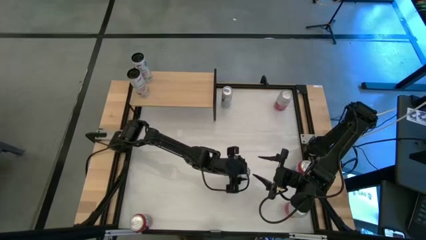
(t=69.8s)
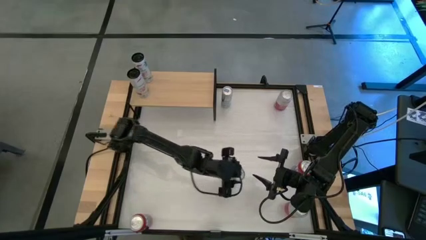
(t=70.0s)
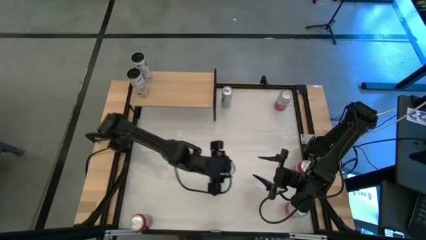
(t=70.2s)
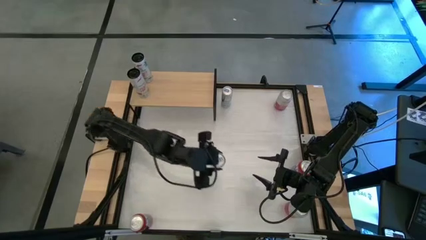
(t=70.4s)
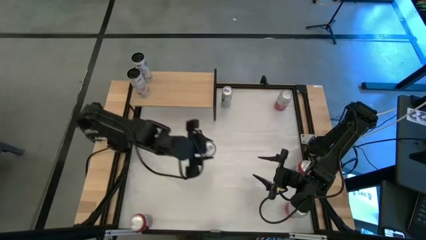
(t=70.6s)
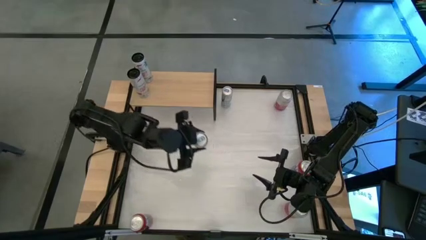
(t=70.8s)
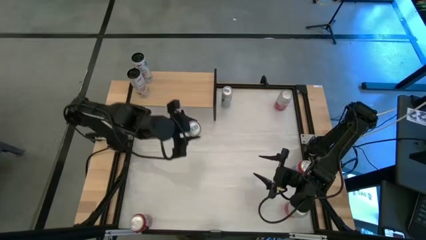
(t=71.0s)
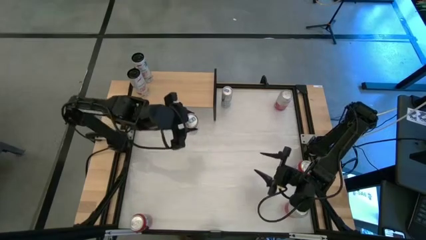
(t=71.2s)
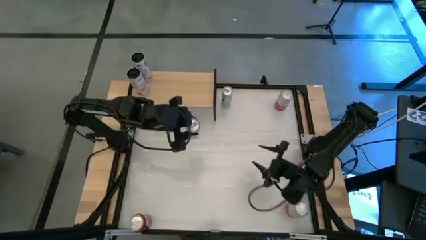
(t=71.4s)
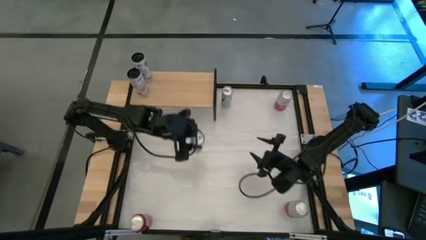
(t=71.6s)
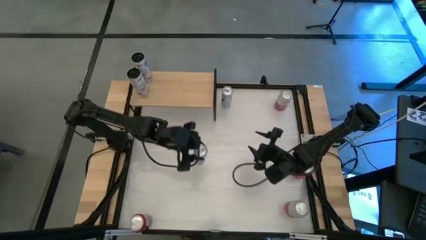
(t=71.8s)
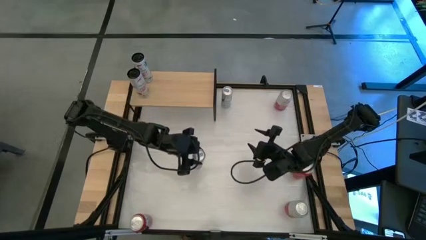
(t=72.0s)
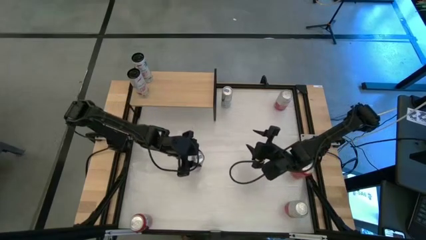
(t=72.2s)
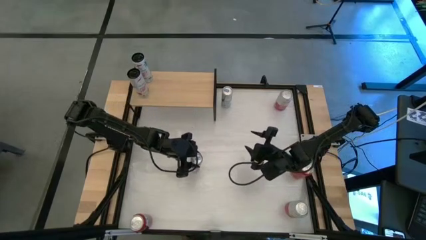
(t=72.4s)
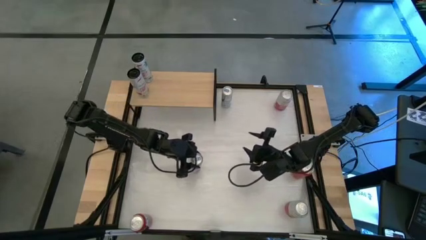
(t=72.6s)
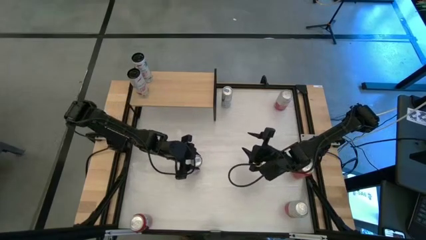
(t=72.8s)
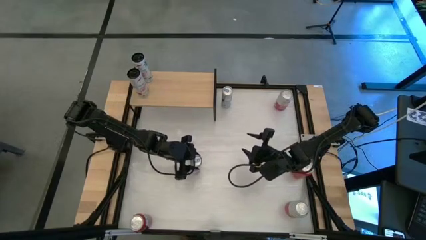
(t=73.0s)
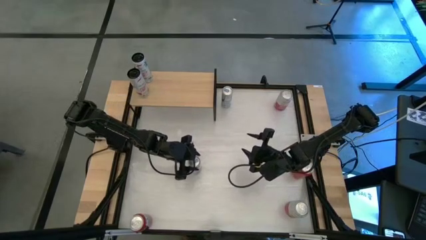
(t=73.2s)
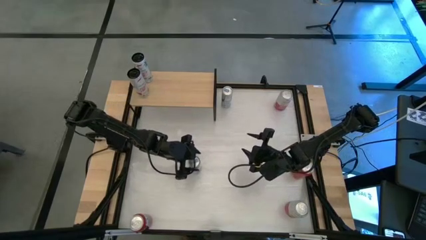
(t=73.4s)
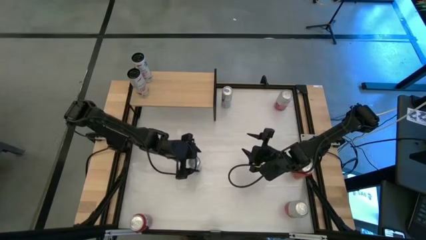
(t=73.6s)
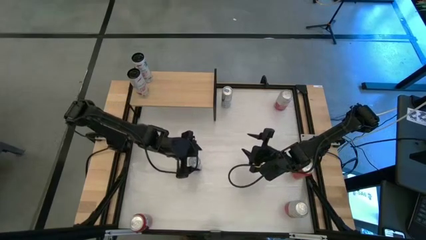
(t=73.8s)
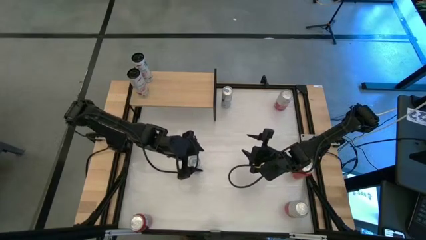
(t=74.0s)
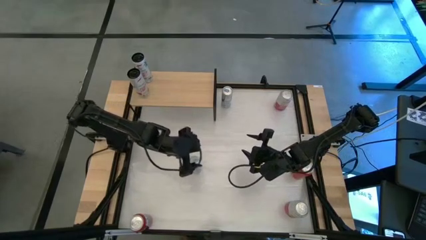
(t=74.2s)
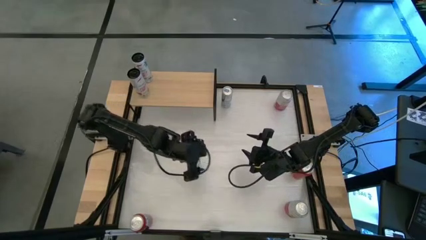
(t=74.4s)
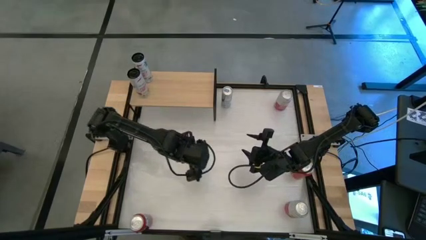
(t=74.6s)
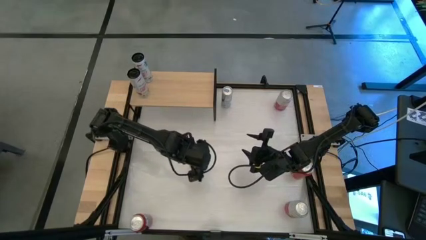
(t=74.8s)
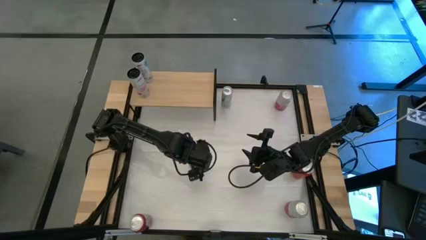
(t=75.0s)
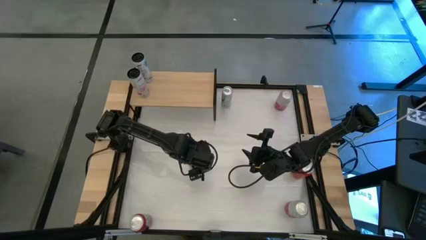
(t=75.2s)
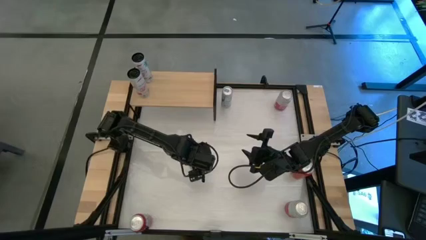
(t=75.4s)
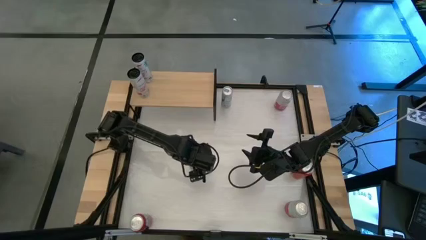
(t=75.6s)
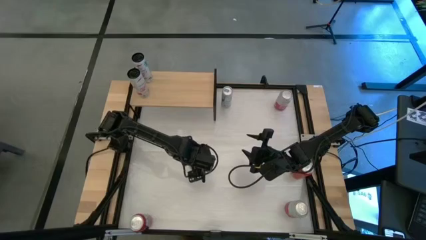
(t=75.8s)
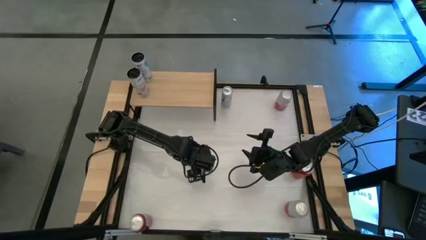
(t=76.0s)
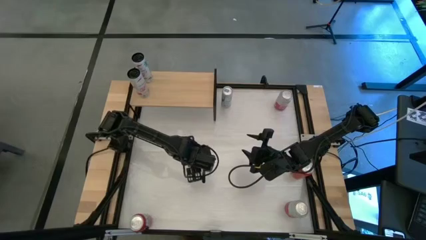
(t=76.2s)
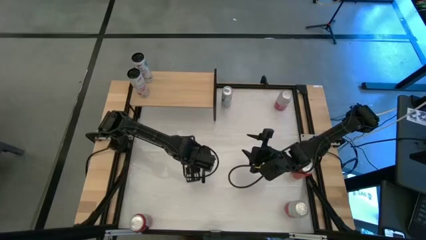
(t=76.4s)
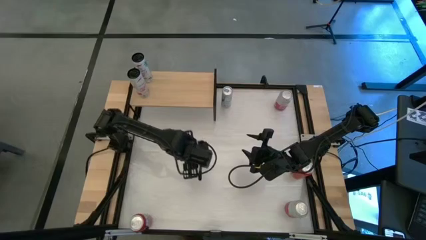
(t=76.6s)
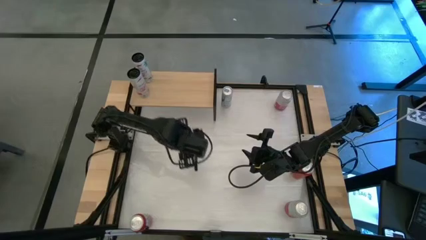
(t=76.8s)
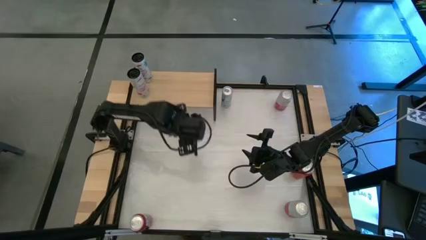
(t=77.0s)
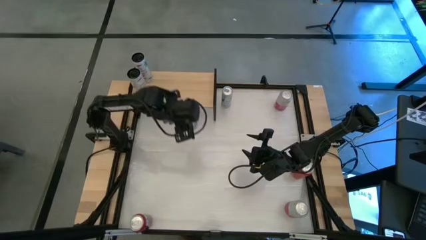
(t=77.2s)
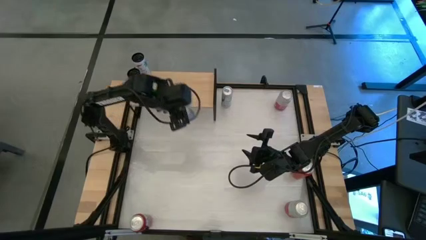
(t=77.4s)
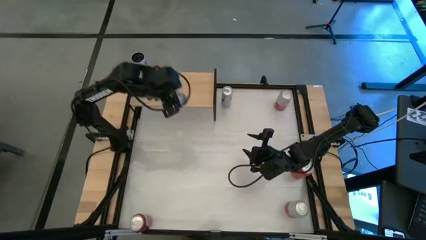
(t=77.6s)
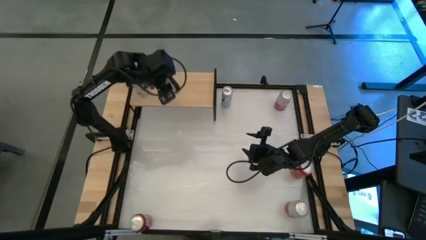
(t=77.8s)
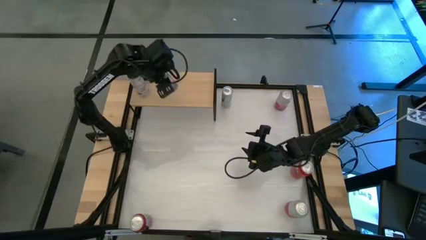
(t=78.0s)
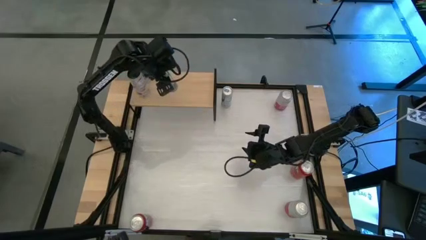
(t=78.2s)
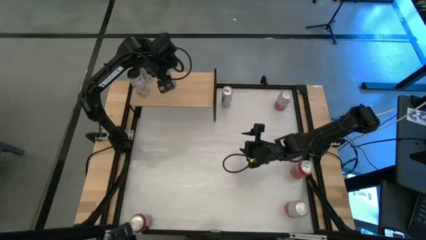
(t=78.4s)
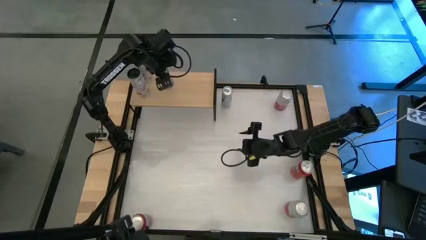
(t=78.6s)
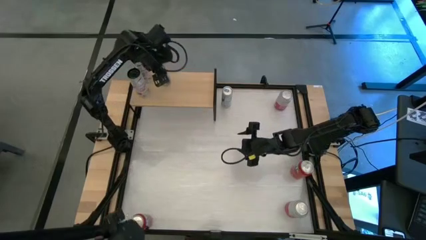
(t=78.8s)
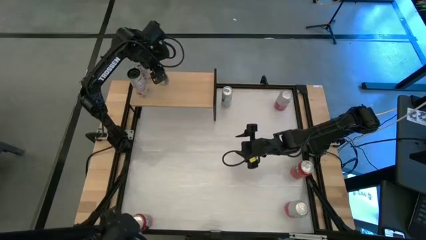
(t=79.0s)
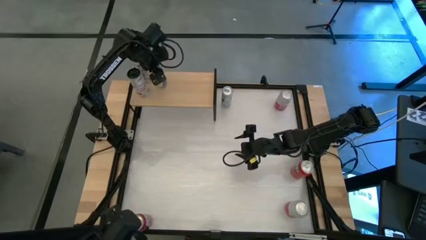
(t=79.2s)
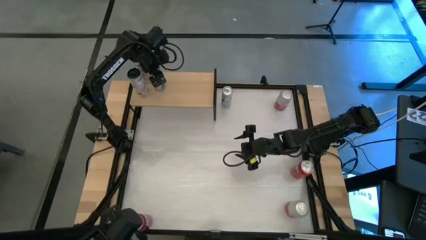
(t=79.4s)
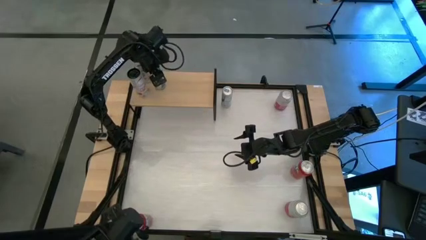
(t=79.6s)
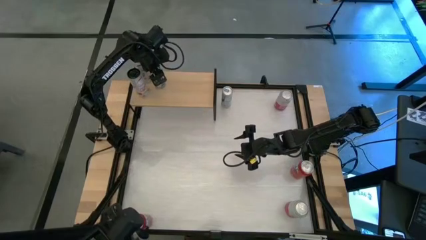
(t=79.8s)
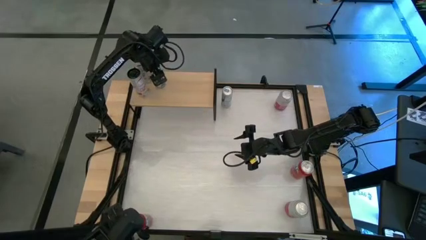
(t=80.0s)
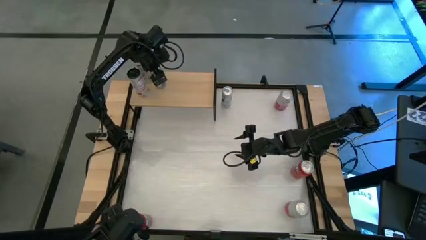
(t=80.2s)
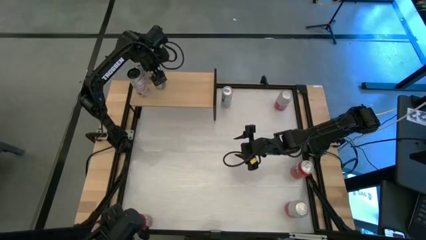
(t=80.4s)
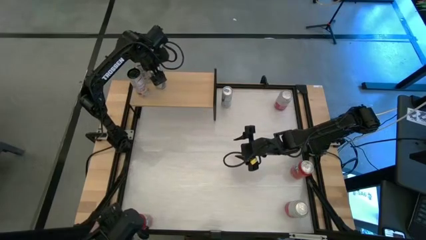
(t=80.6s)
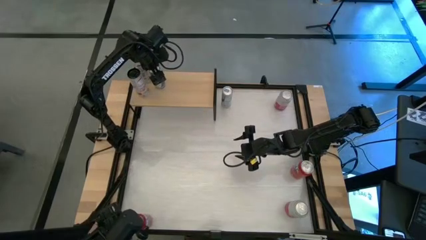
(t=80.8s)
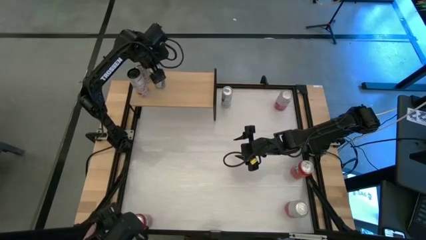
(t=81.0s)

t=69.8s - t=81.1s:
Task: Place canned beverage on shelf
Put the bottom blue soda can on the shelf

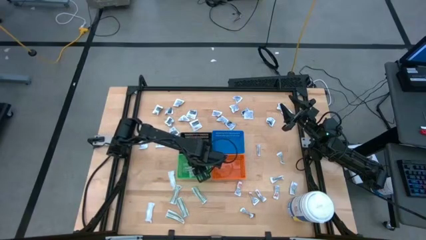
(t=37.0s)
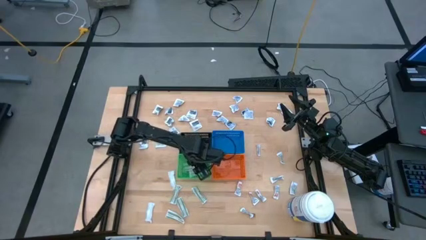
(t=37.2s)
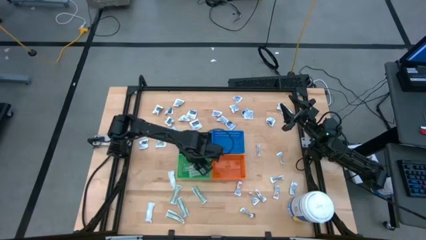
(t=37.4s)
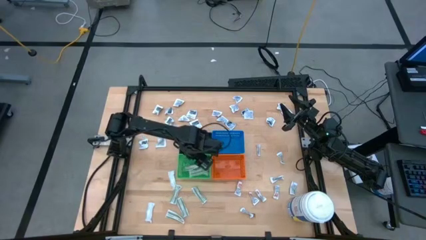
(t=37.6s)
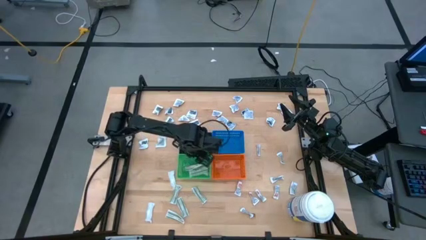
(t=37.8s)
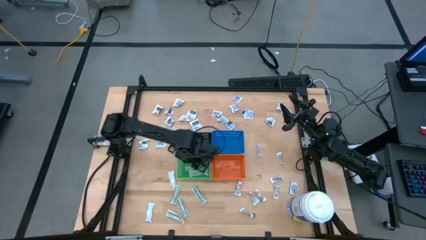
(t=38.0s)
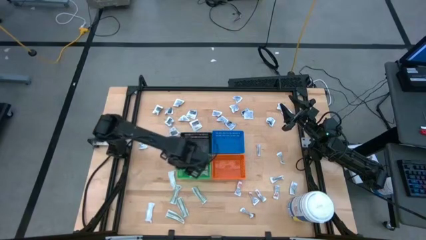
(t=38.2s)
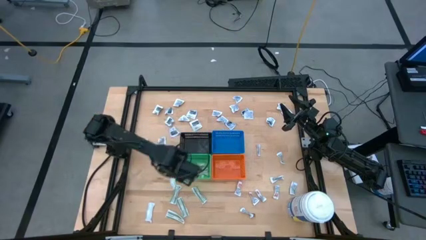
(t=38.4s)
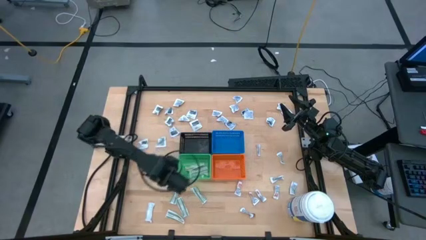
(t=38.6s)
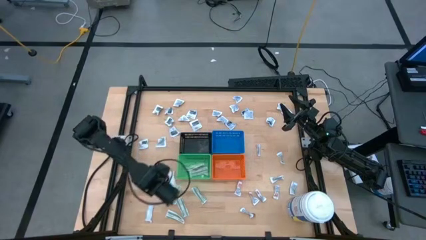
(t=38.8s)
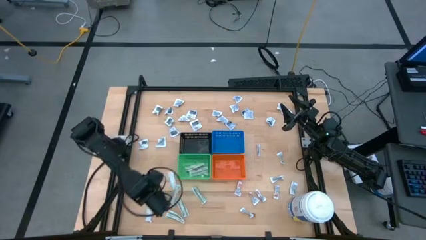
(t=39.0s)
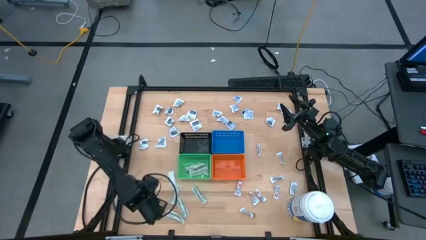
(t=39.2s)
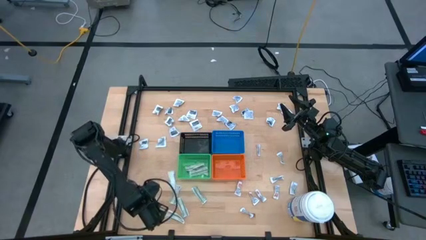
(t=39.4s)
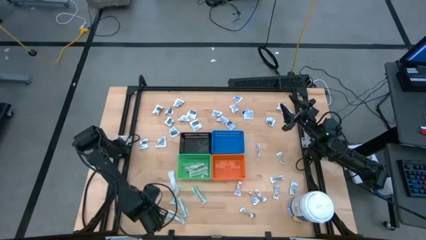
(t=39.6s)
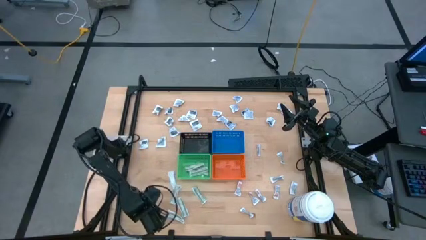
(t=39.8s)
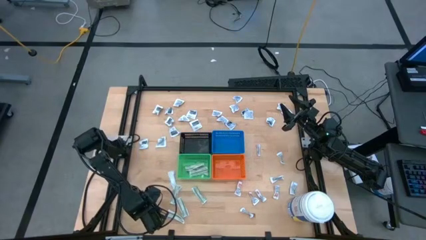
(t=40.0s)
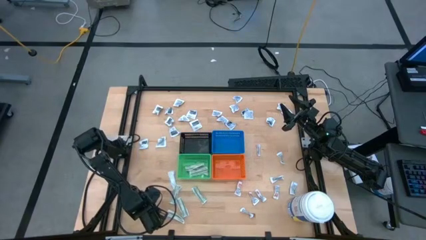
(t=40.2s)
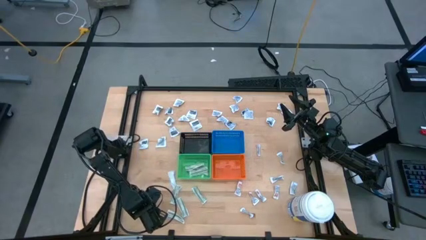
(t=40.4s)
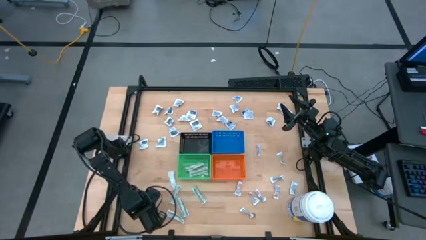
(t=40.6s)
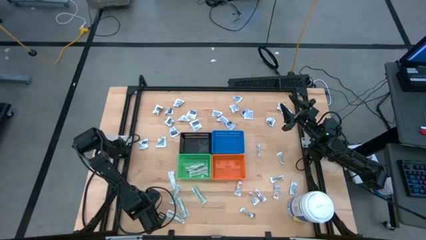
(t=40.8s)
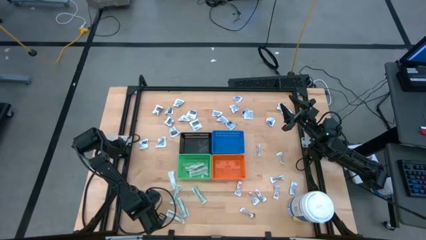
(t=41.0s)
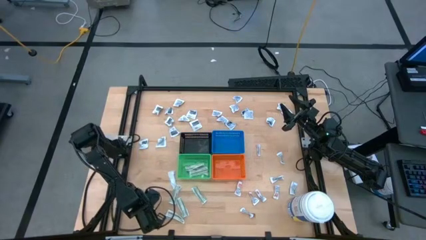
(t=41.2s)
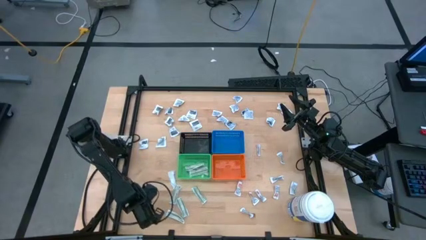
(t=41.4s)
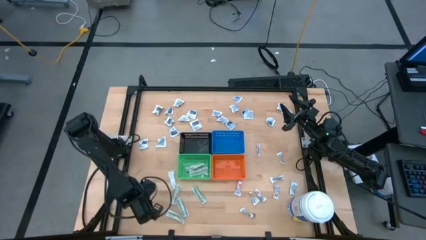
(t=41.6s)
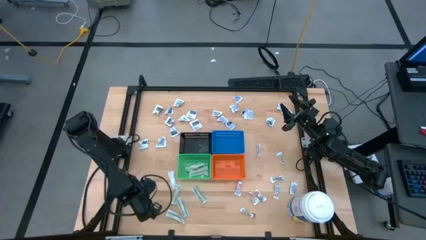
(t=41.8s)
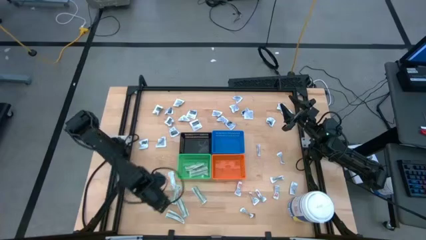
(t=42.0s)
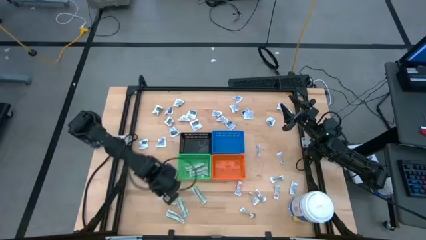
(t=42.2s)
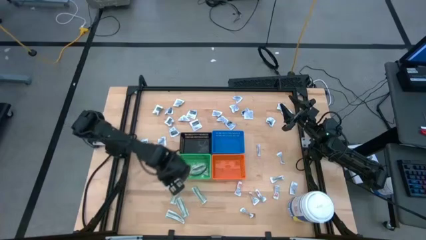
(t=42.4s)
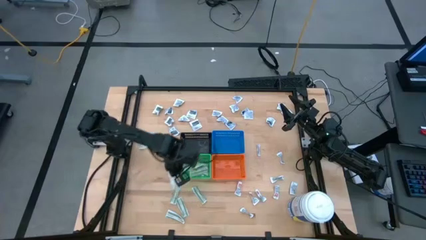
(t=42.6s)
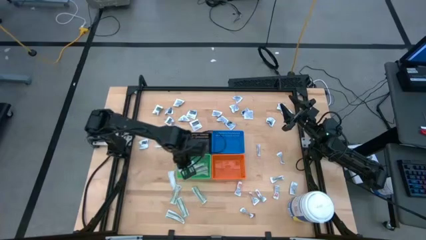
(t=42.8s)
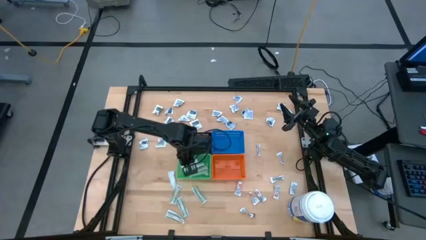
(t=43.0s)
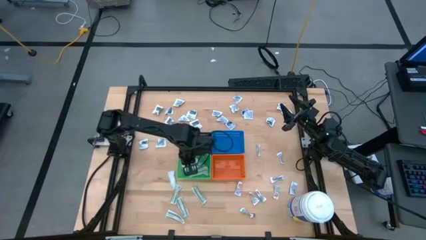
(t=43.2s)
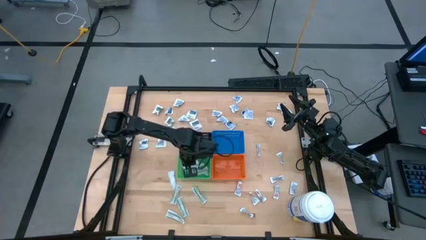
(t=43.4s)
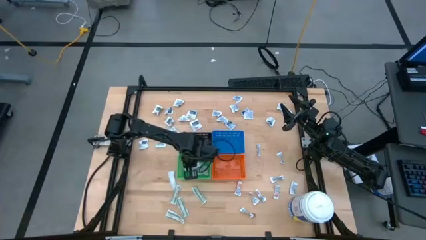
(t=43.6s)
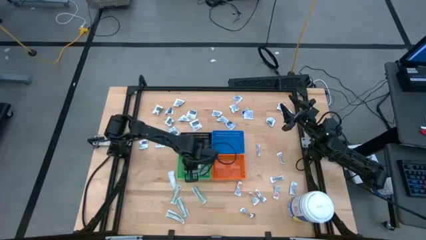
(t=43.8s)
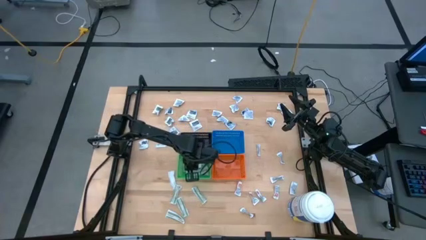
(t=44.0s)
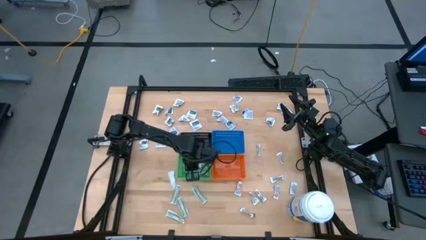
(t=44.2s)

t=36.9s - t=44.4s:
Task: Pick & Place First Aid Supplies
Put the bandage into the green bin
